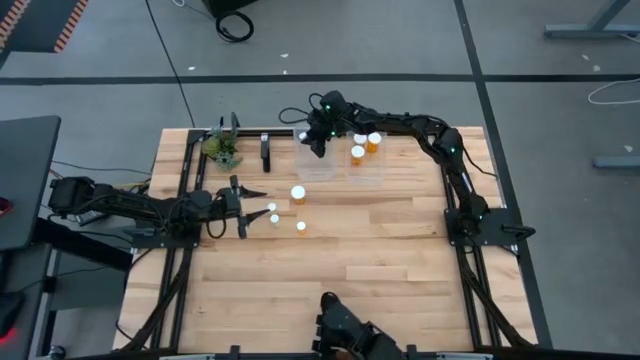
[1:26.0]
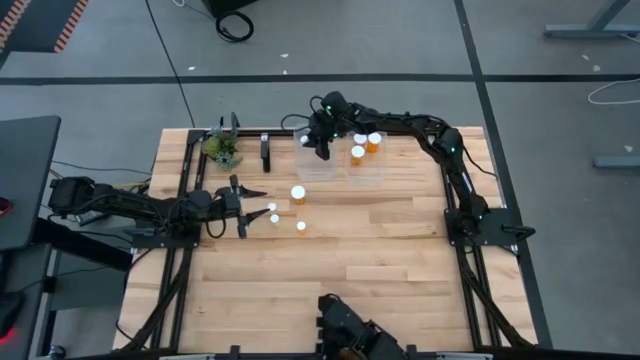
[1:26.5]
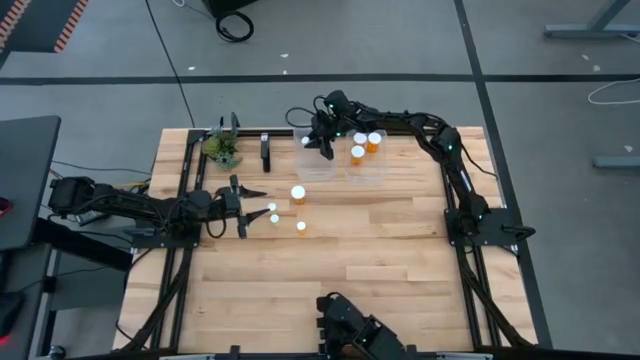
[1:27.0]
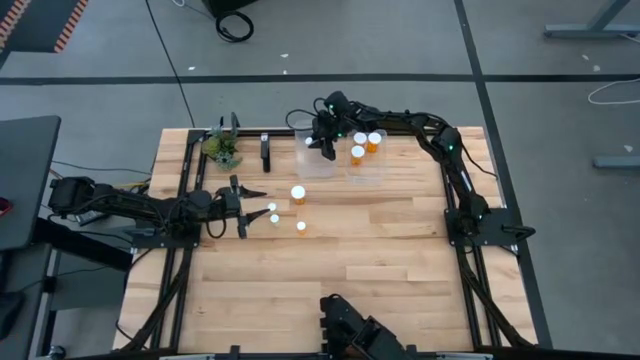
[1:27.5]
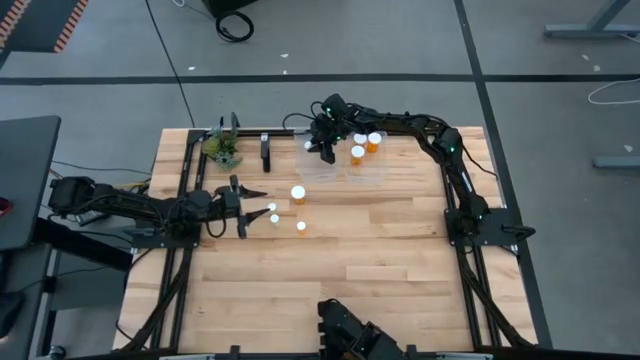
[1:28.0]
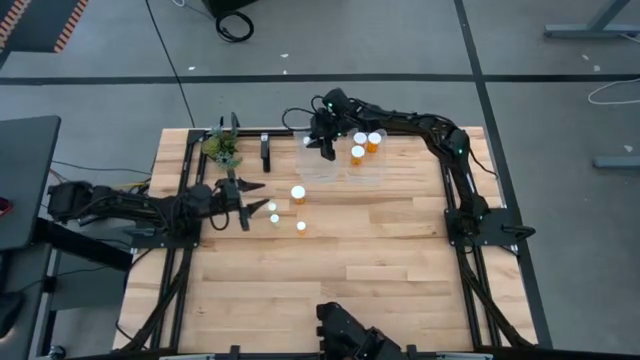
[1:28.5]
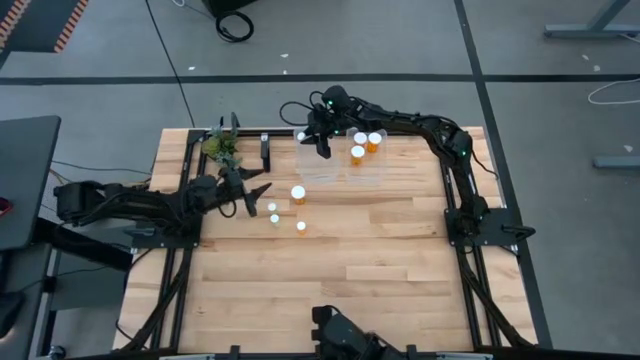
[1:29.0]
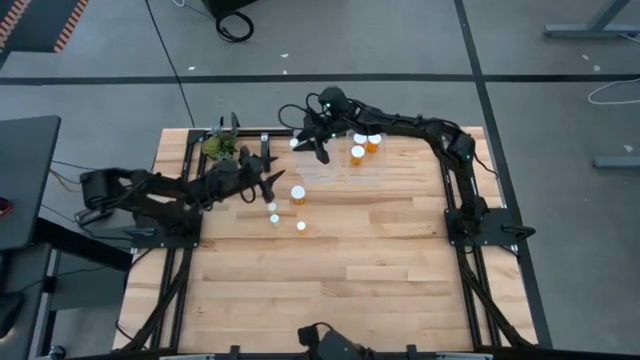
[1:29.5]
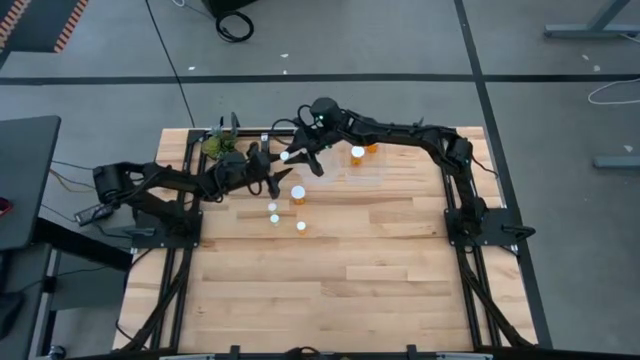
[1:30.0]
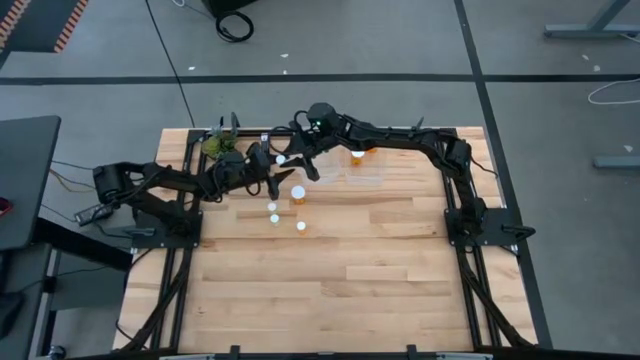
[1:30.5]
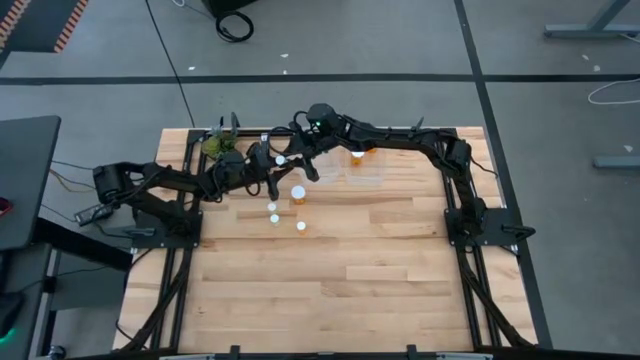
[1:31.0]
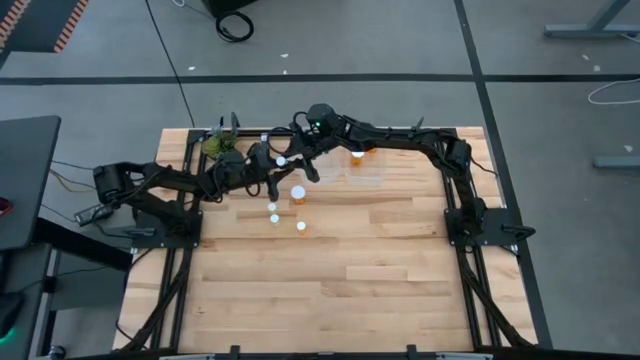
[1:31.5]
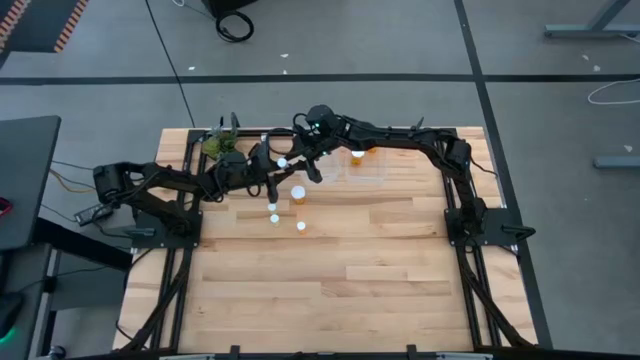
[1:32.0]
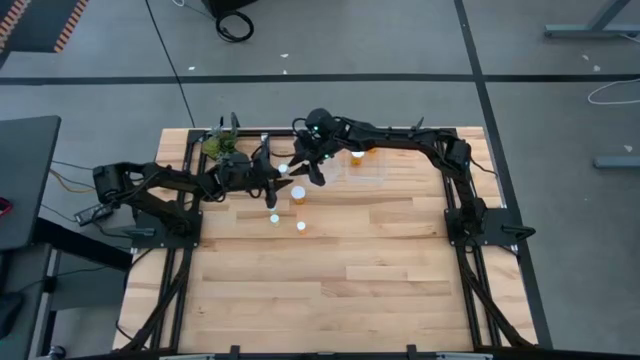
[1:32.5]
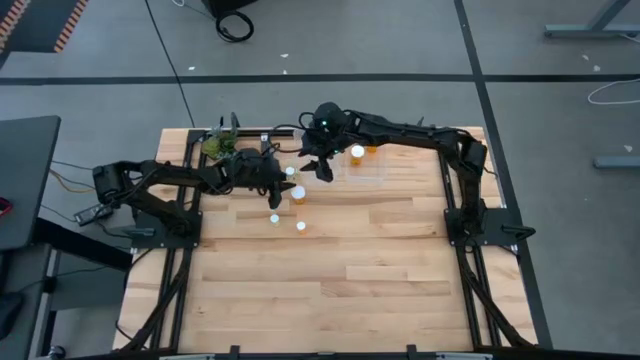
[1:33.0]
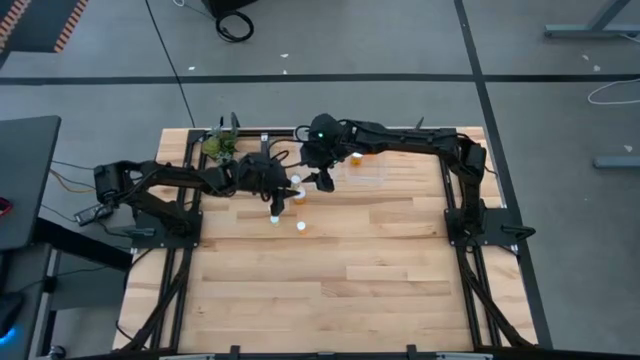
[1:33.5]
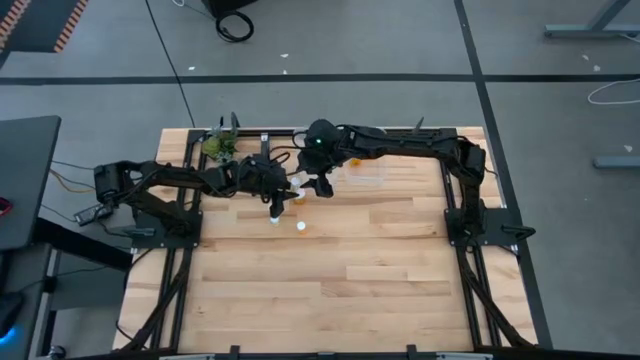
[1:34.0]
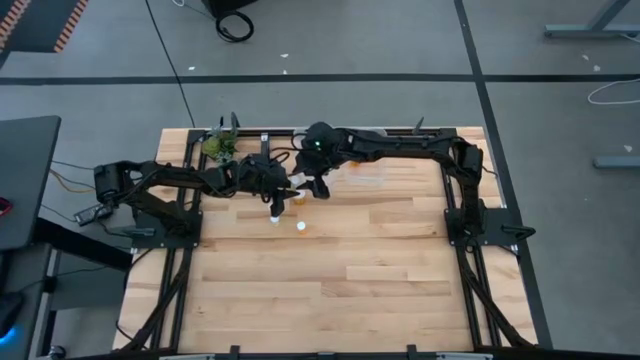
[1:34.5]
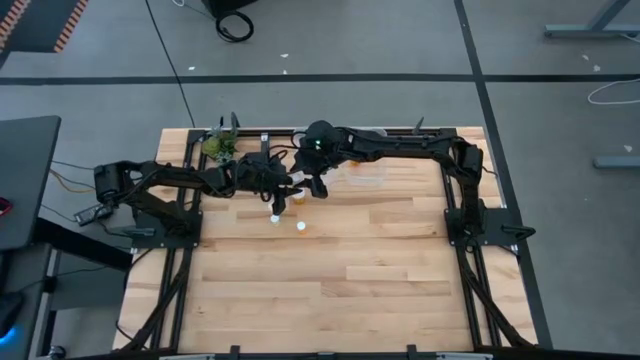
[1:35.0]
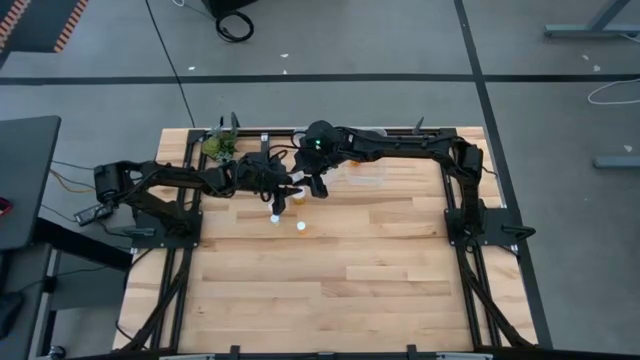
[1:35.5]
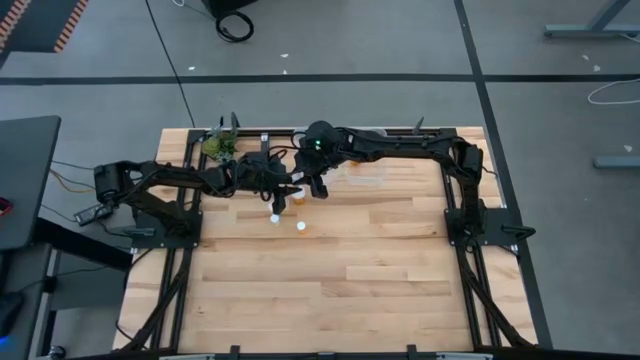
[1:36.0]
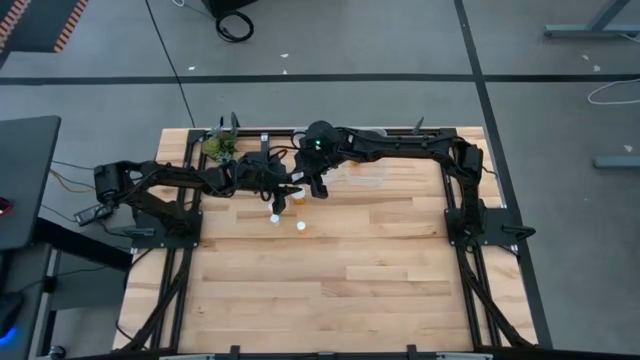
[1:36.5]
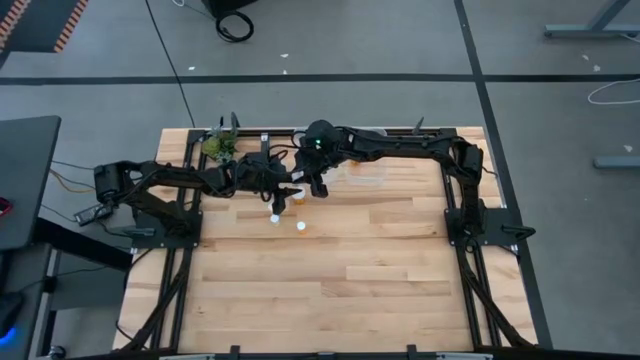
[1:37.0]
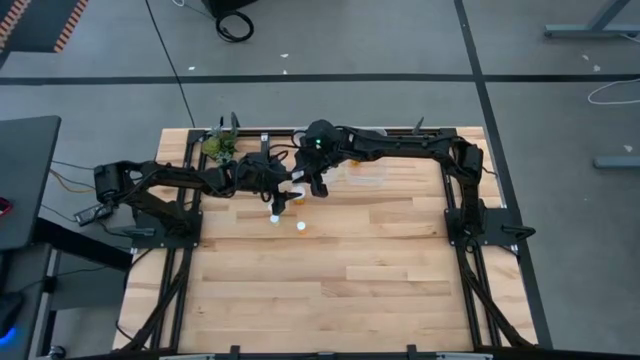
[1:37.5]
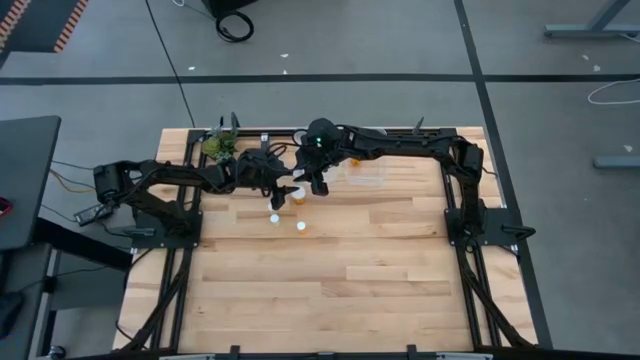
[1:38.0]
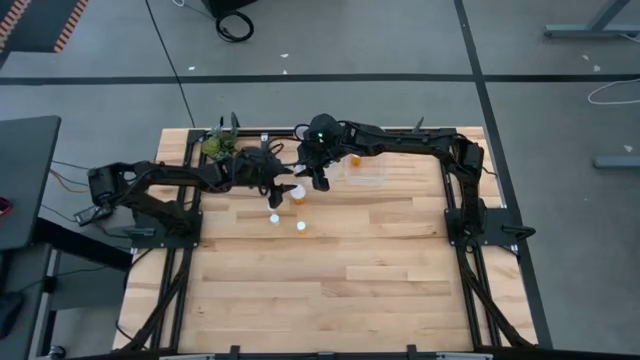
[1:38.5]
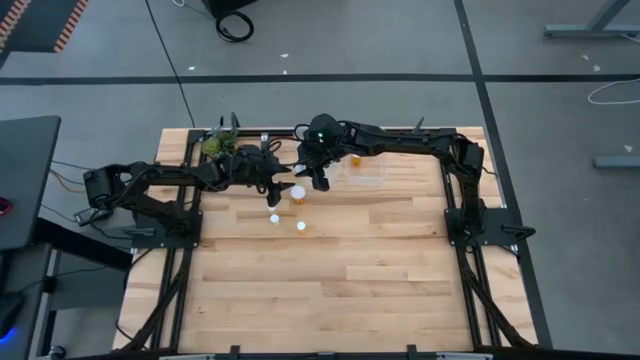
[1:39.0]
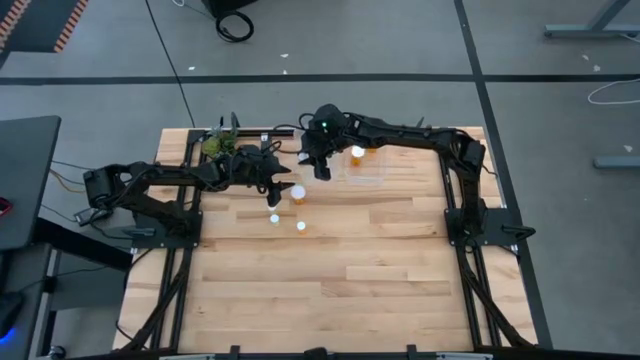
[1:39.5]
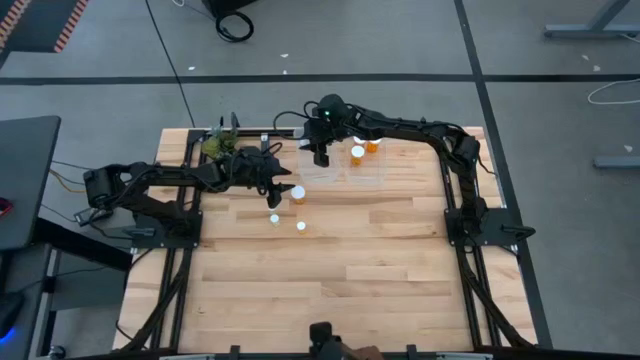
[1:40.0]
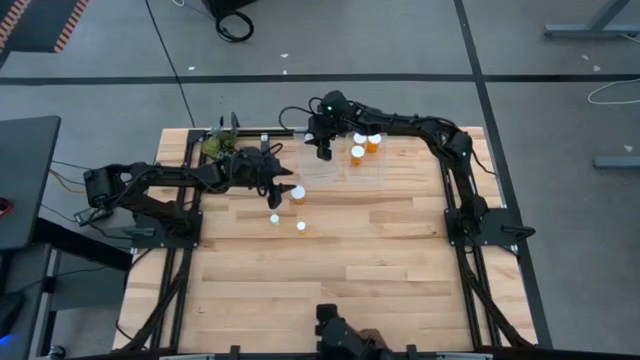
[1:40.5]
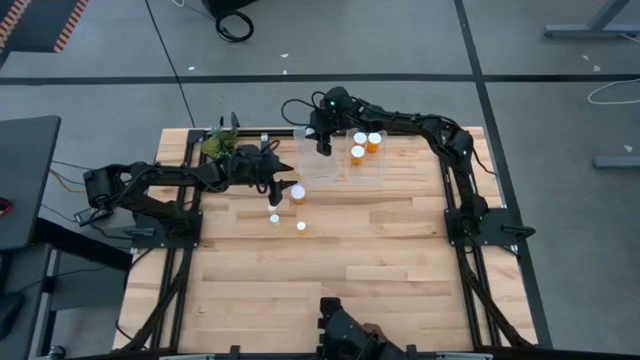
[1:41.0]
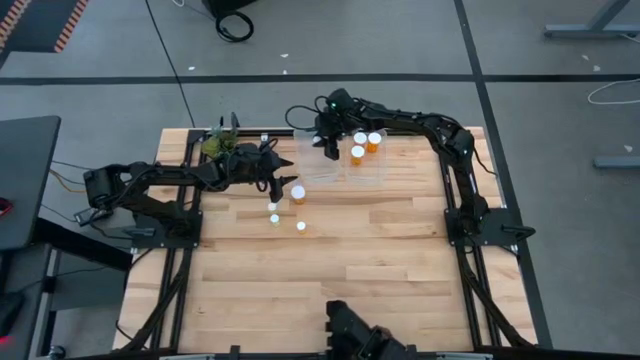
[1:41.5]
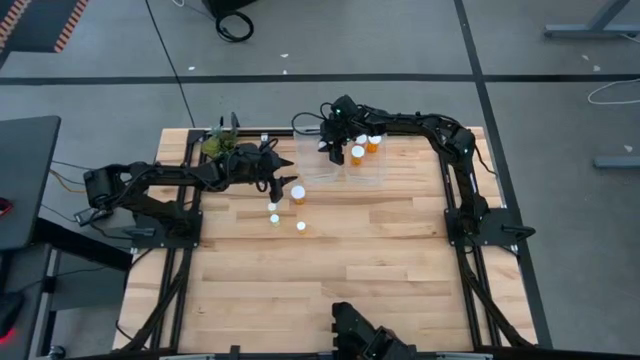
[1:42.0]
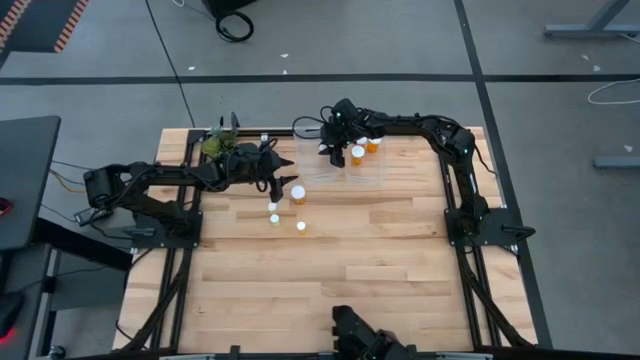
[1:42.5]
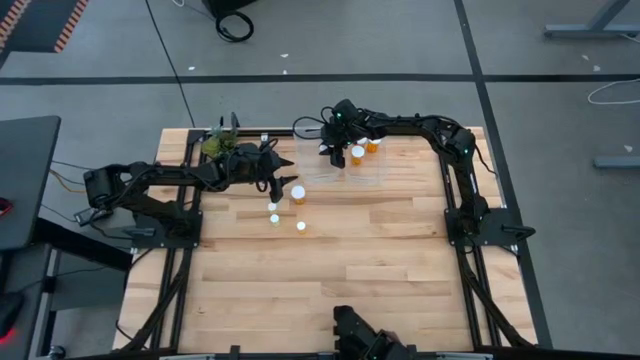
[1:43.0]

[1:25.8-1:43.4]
Task: Pick and place medicine bottles into bin by pill shape (circle, oval)
Put the bottom right small yellow pill into the left transparent bin

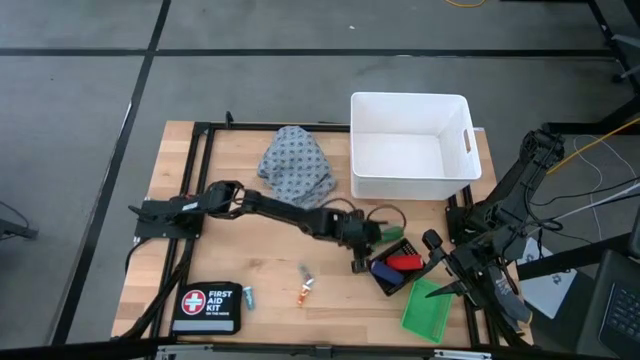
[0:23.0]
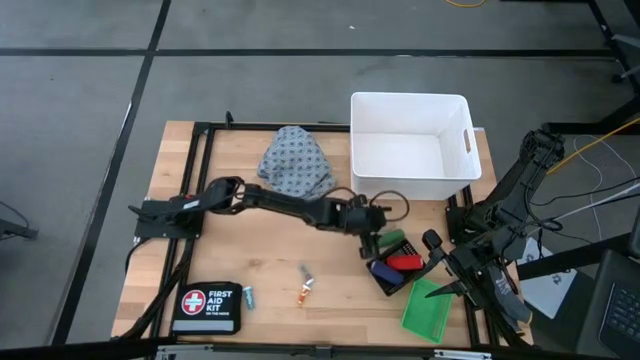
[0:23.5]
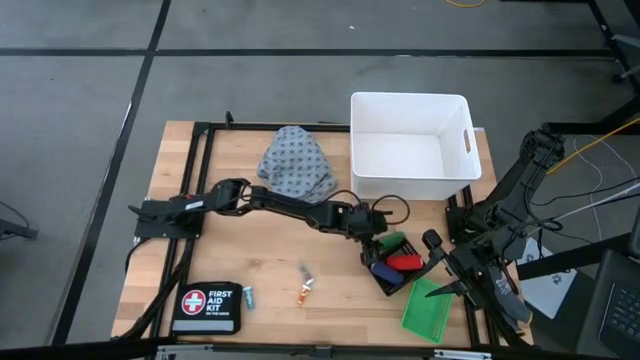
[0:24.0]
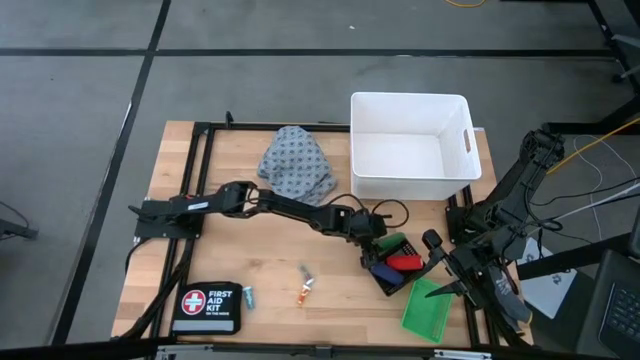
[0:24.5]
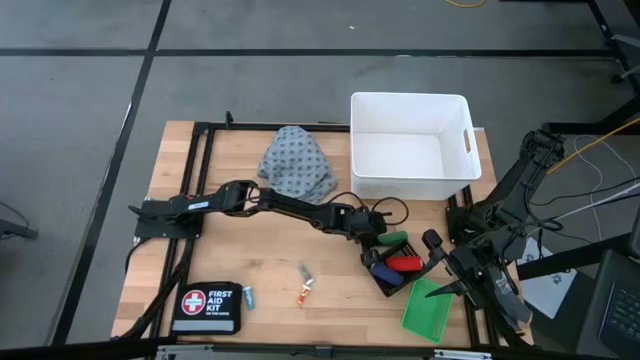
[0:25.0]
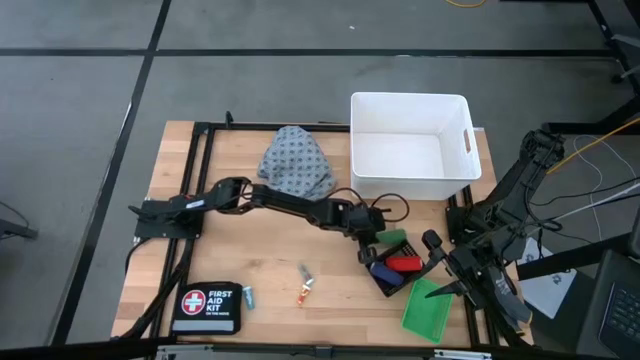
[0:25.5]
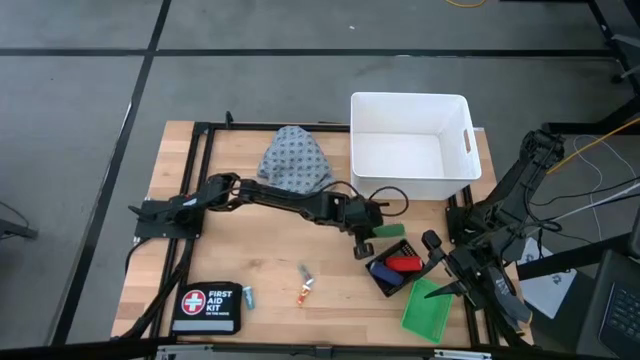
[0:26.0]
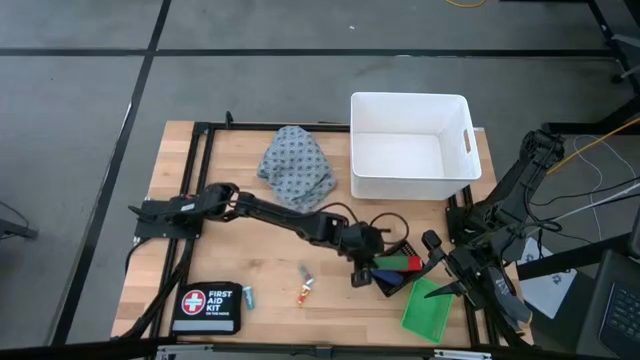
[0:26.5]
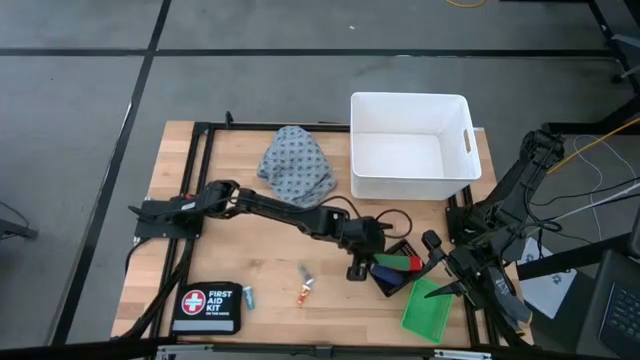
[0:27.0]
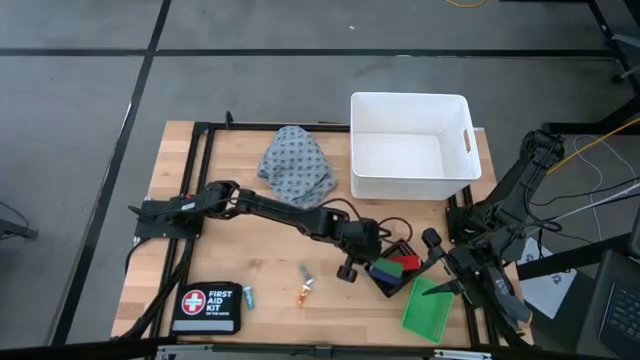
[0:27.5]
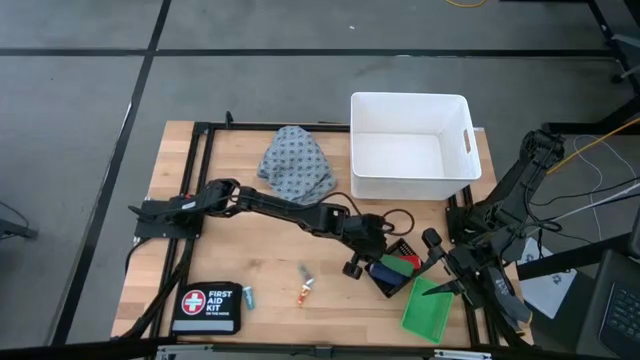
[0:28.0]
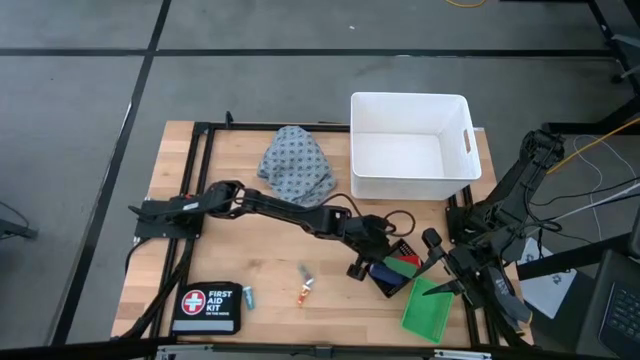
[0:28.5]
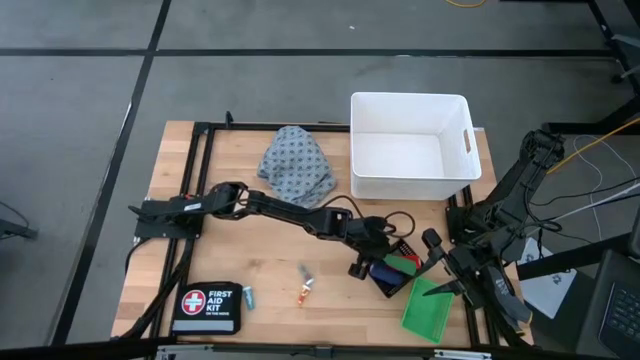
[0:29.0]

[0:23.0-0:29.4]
Task: Pick & Place Medicine items
Put the green bandage into the black bin
